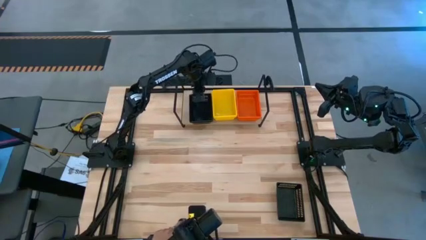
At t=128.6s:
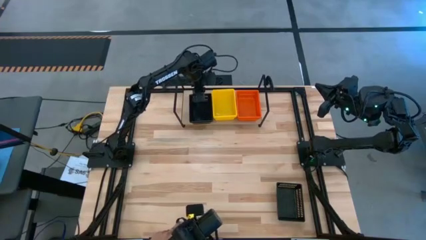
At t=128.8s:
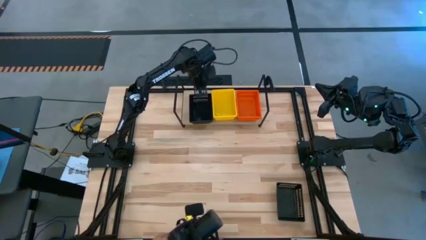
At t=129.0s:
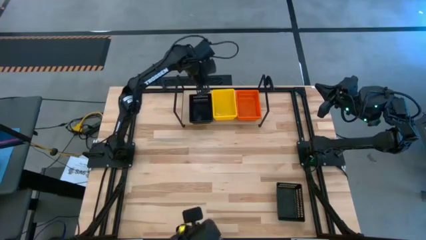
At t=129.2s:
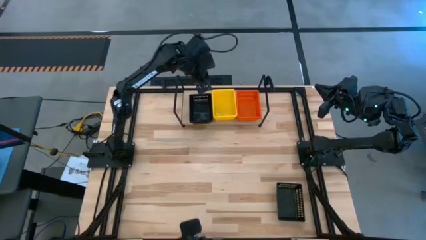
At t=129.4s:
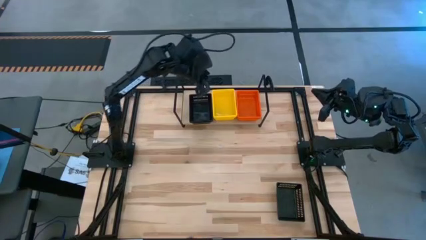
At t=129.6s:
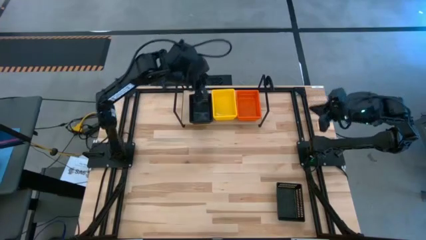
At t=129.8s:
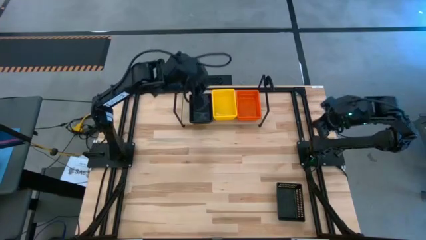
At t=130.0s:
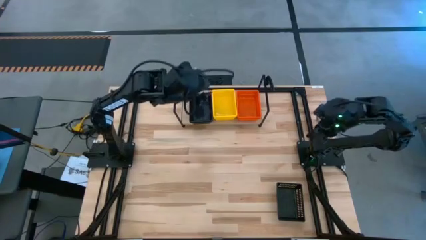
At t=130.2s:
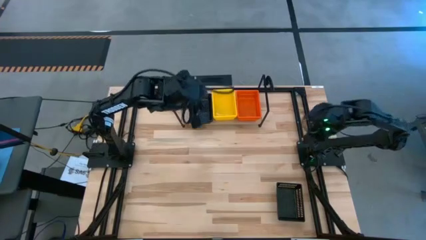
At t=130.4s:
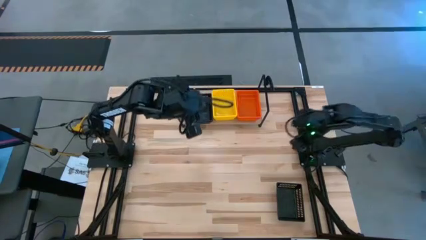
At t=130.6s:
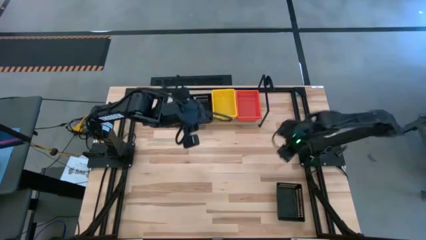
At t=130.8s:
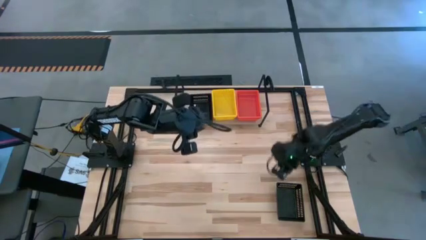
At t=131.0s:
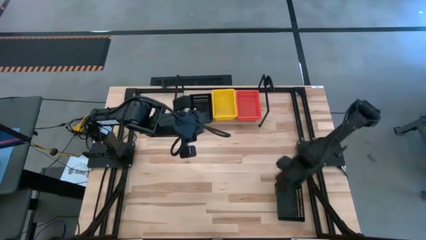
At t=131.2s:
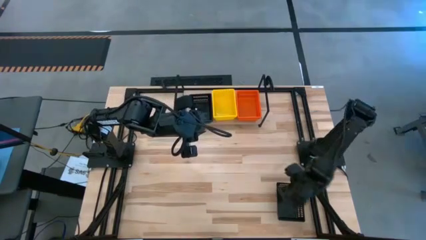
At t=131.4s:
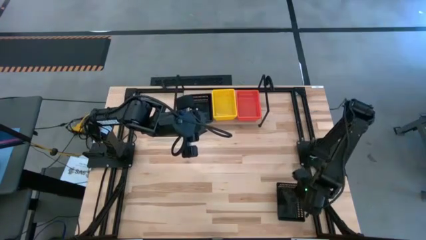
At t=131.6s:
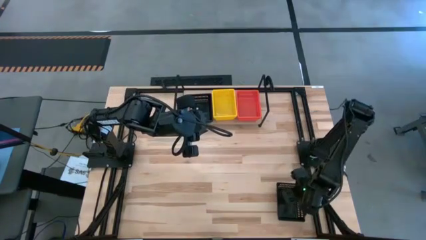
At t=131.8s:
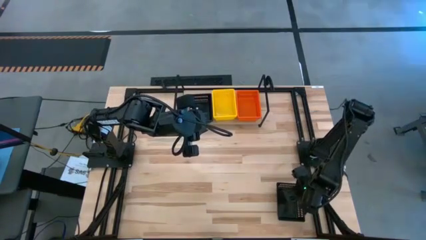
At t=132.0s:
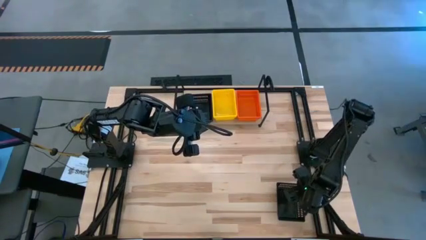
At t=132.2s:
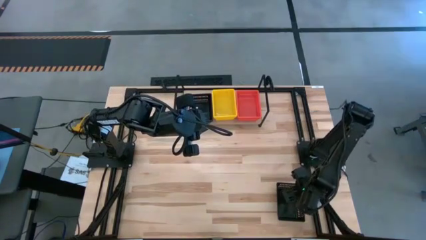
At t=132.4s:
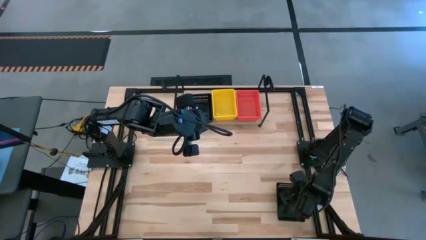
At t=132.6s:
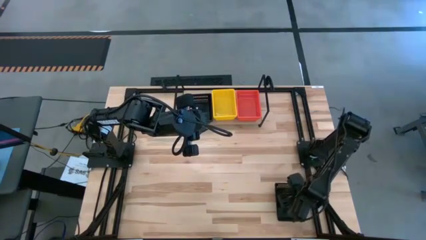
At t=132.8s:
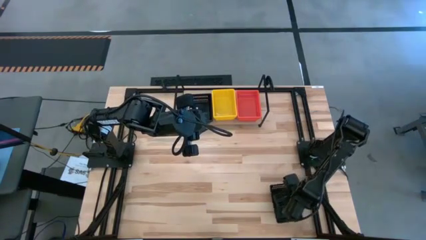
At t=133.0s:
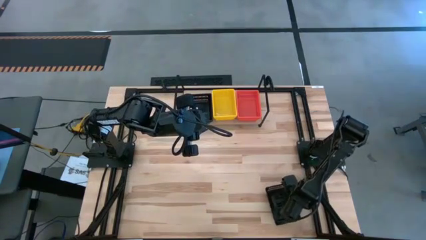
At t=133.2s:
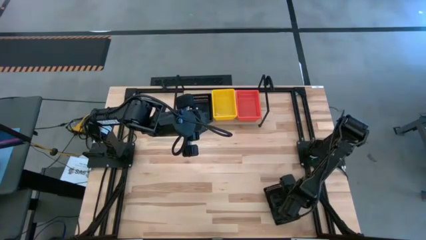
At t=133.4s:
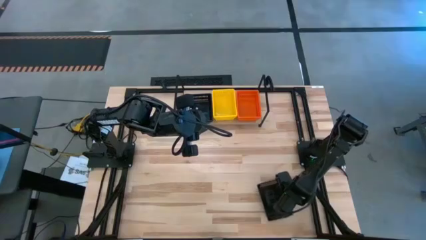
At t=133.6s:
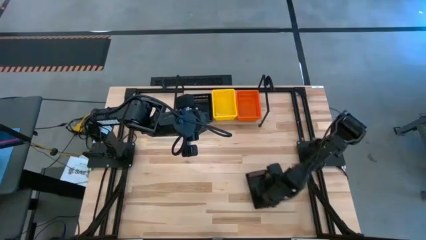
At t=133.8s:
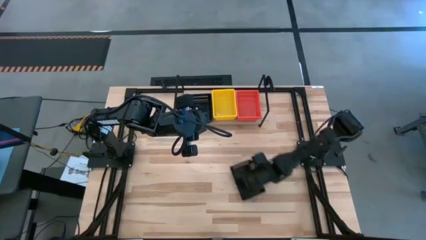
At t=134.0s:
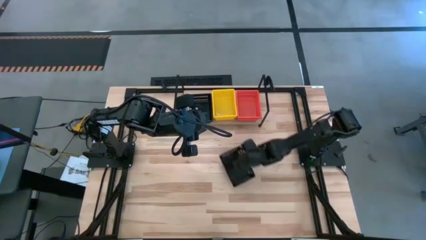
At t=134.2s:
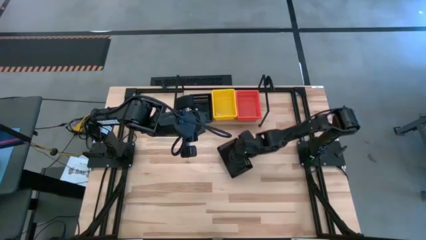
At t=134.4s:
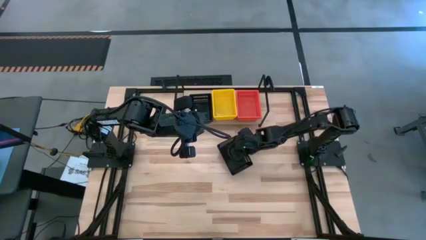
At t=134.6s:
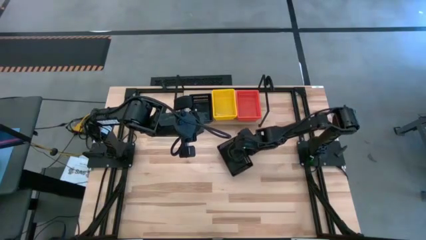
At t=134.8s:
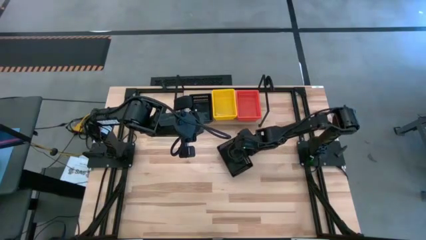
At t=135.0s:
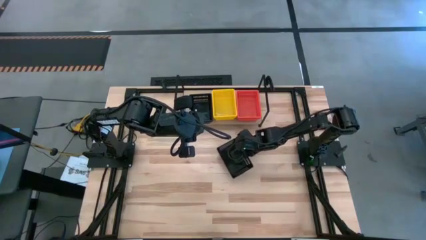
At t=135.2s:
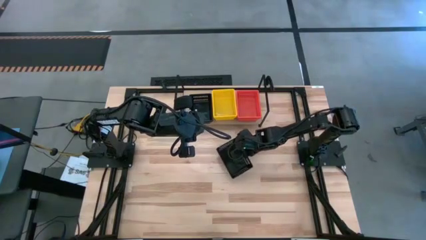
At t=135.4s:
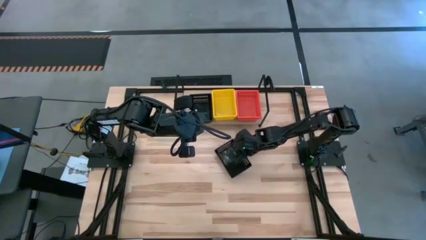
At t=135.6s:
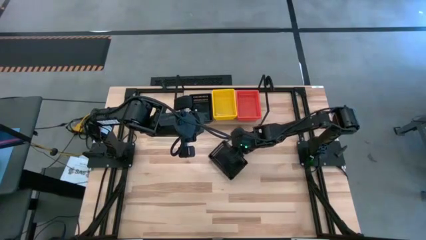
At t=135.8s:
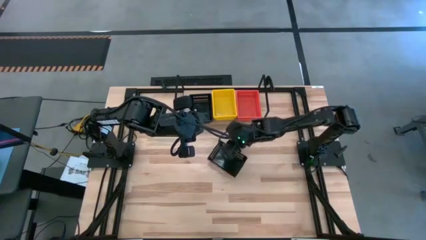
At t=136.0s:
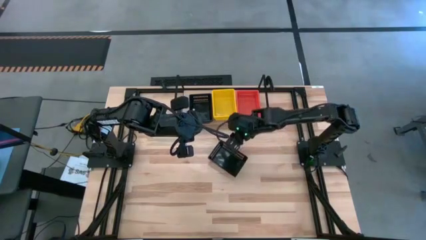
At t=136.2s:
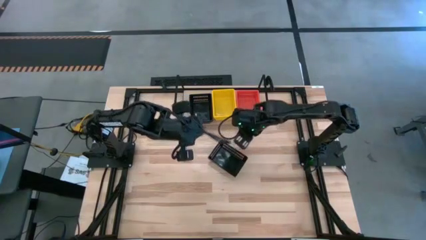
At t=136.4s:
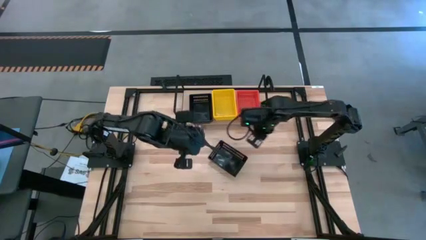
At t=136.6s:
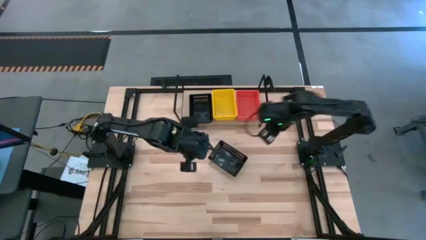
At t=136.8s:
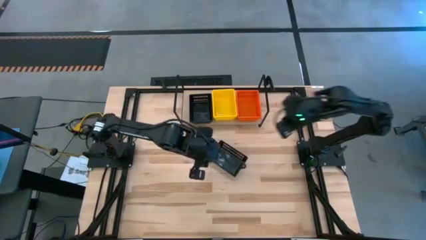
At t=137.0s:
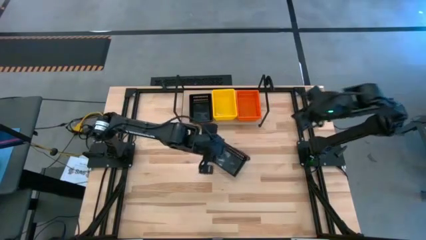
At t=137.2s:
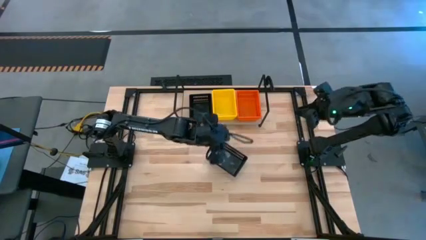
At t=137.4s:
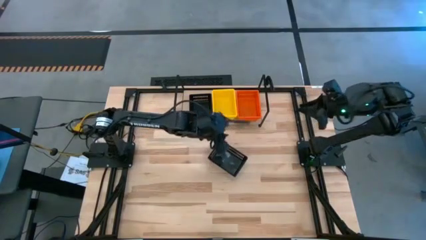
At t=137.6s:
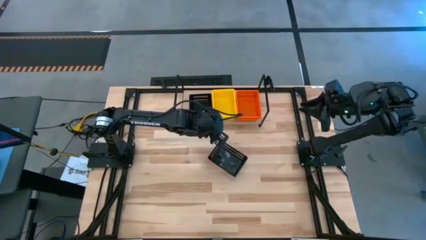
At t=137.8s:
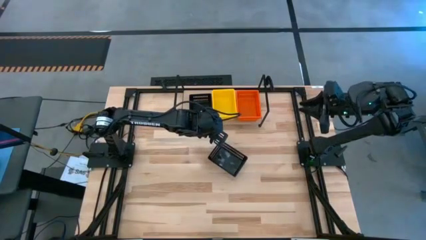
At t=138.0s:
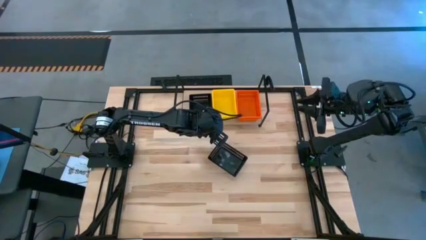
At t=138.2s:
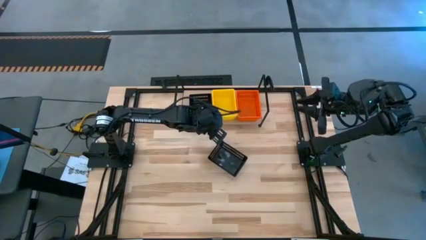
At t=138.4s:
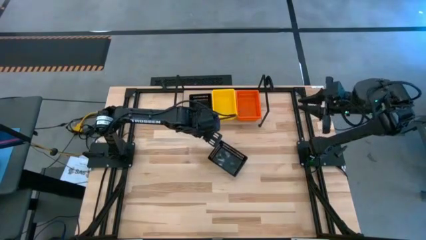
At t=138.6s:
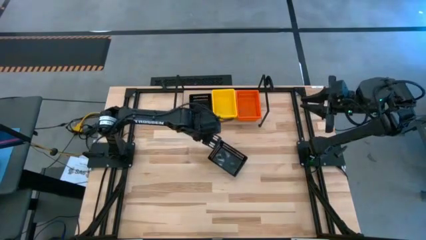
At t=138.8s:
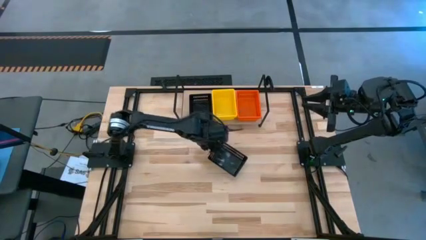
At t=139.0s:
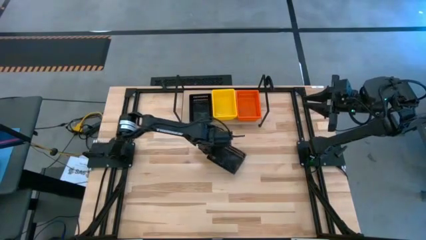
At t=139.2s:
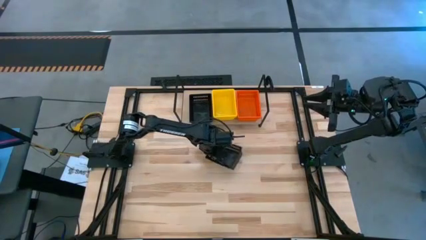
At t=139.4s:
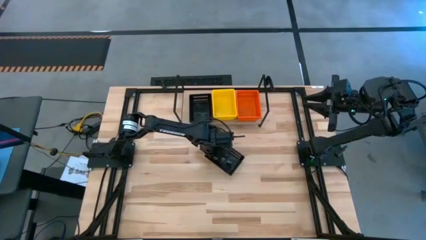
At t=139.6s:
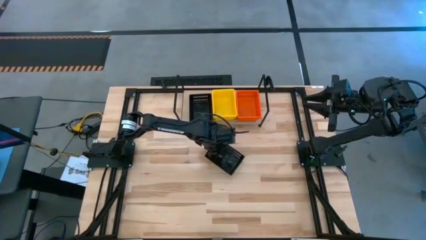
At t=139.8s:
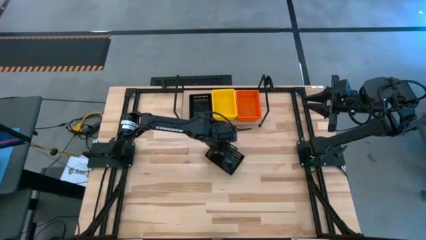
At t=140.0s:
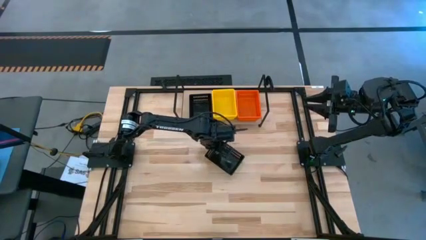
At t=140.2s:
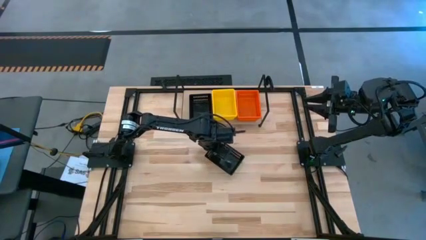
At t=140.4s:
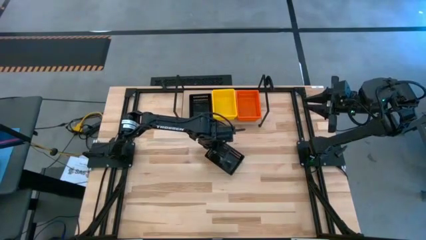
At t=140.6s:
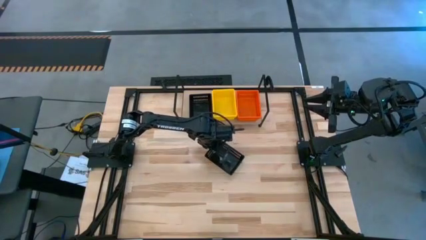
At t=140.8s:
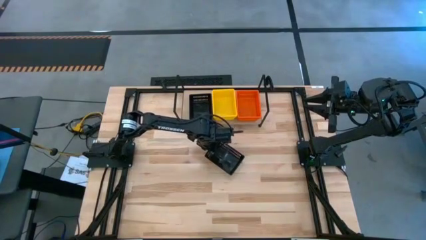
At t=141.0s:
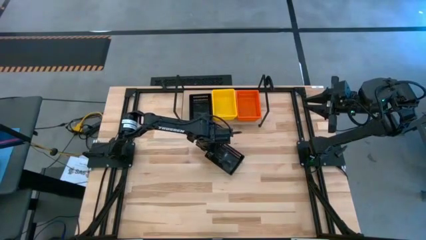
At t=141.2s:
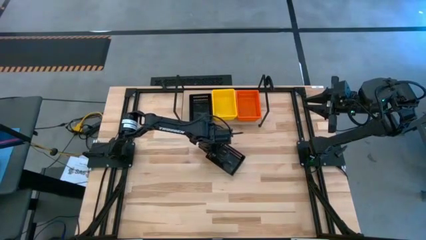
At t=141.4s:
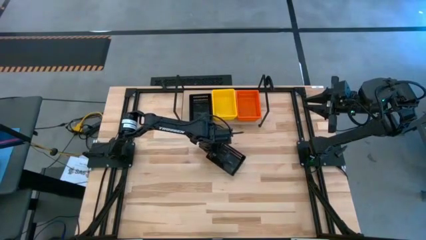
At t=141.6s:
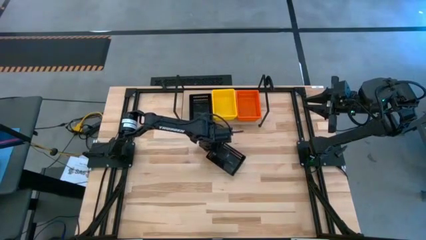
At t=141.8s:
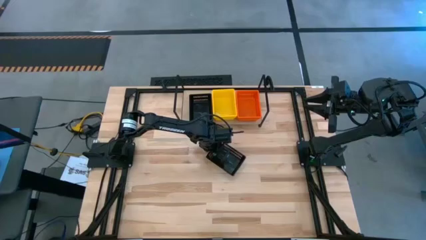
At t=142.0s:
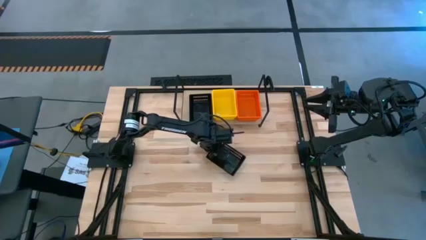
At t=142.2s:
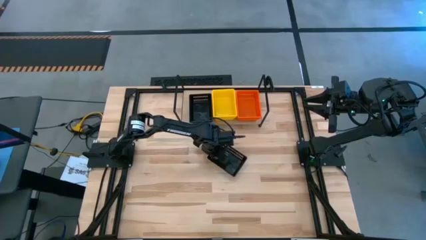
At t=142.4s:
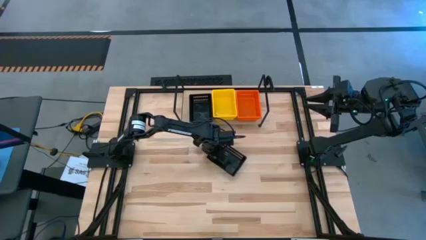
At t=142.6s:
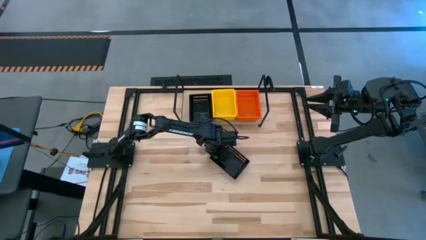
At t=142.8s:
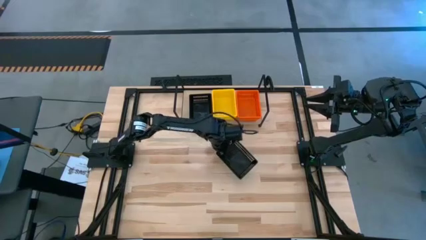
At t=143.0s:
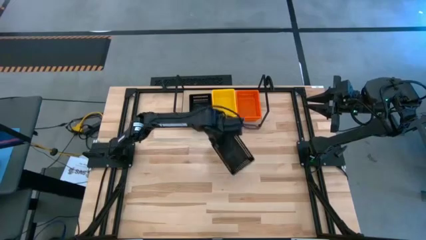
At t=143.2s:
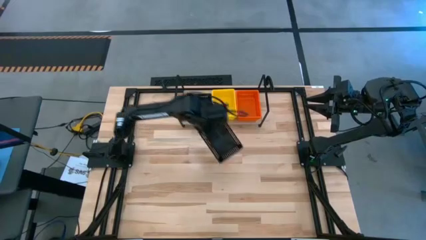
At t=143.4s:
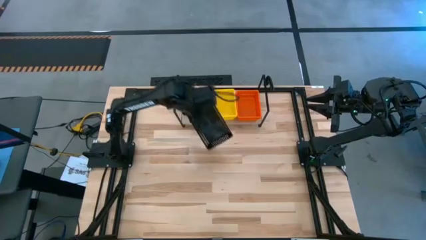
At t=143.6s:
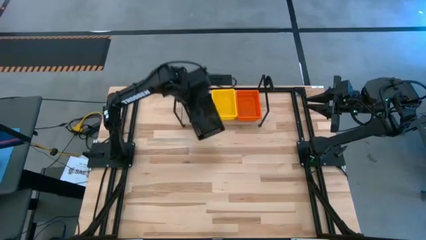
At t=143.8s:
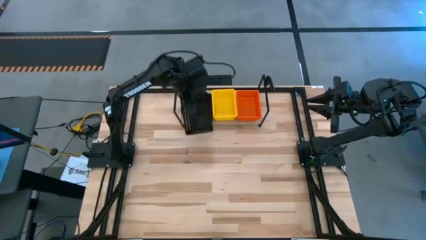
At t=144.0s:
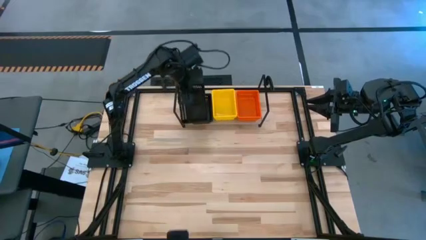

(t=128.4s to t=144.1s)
Task: Stack baskets on shelf by color
Stack the black bin on top of the other stacked black bins on the shelf
